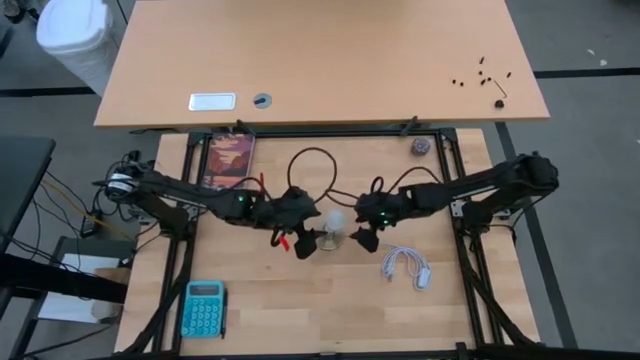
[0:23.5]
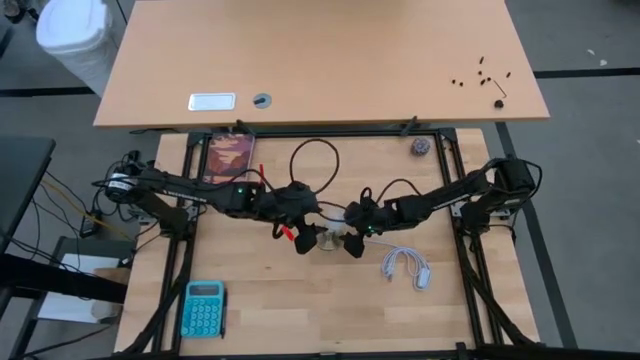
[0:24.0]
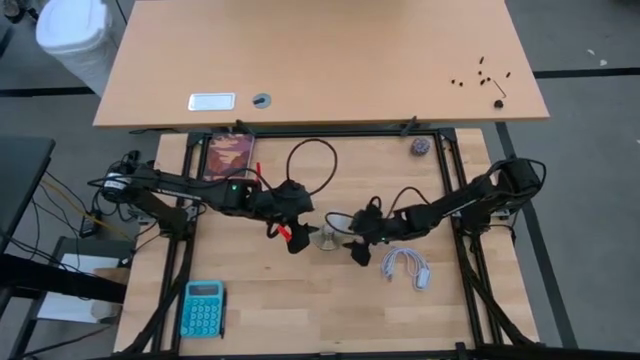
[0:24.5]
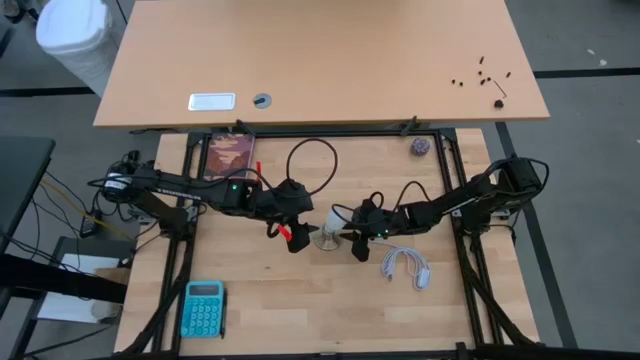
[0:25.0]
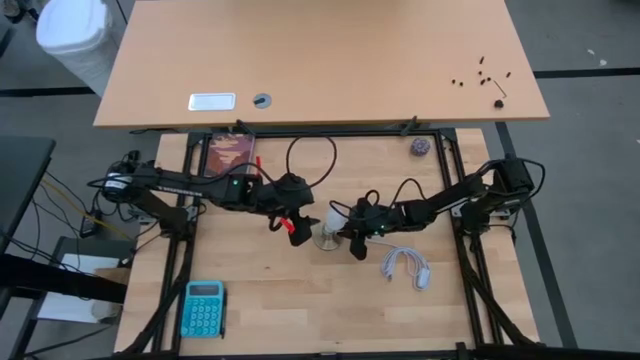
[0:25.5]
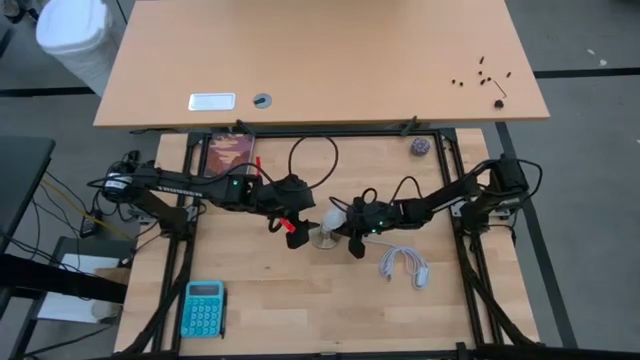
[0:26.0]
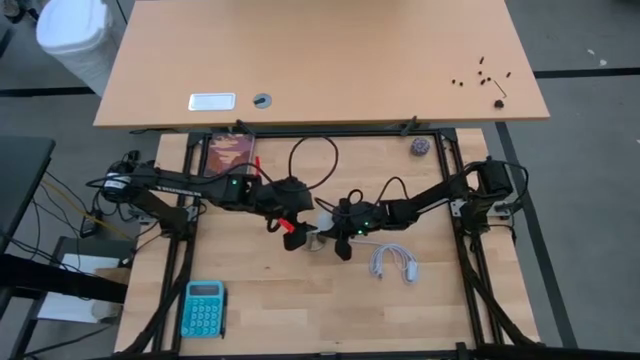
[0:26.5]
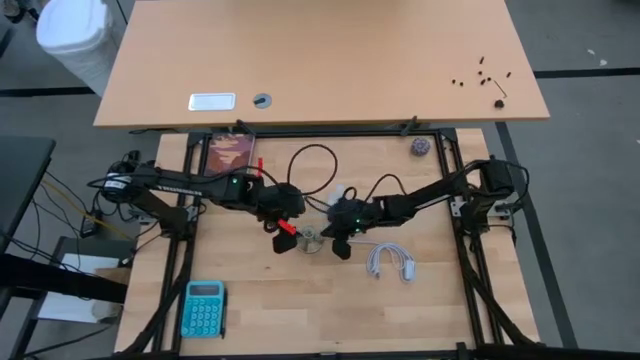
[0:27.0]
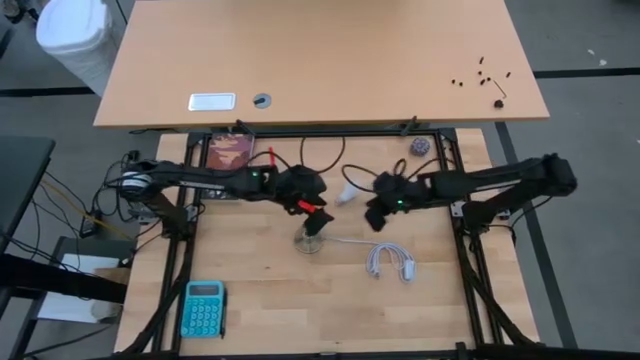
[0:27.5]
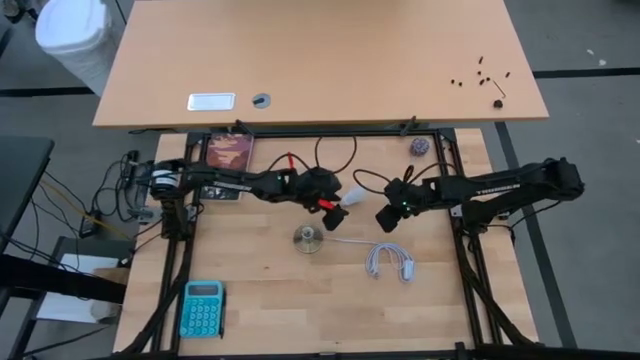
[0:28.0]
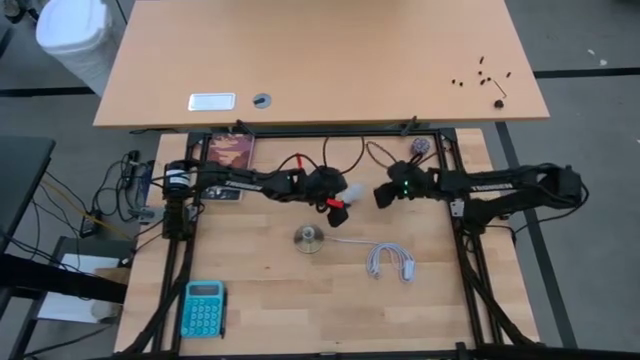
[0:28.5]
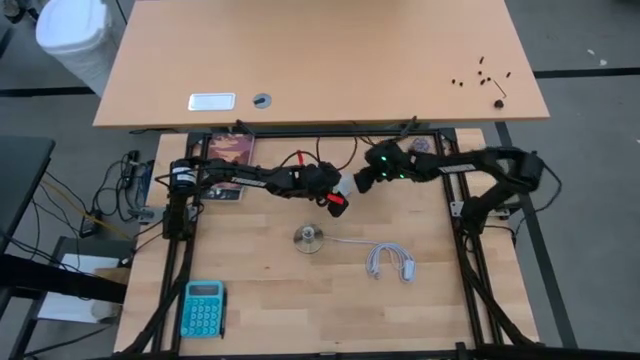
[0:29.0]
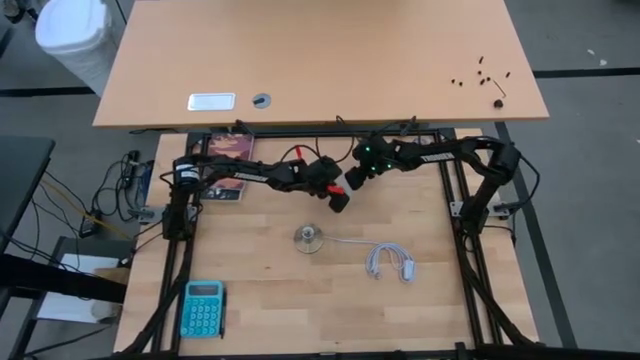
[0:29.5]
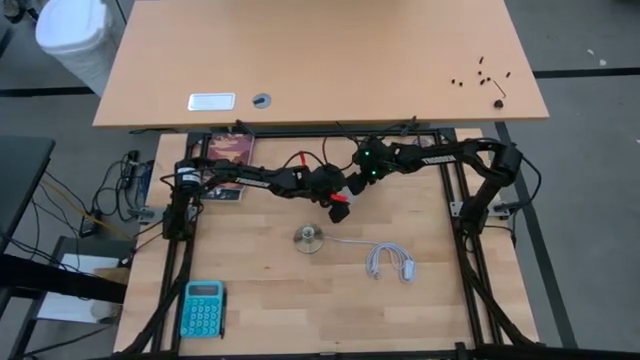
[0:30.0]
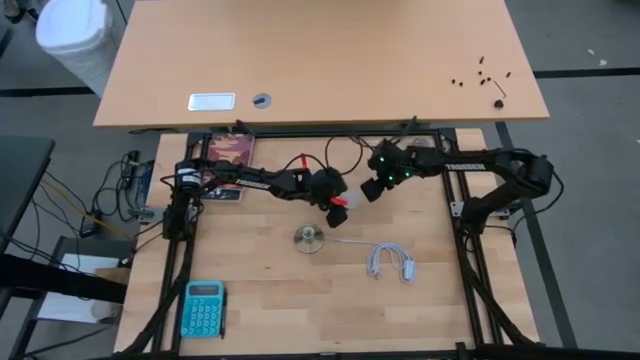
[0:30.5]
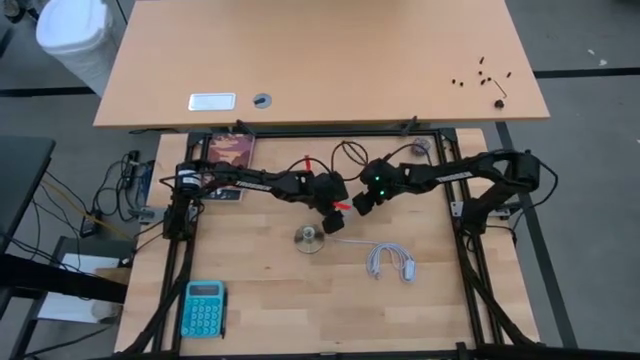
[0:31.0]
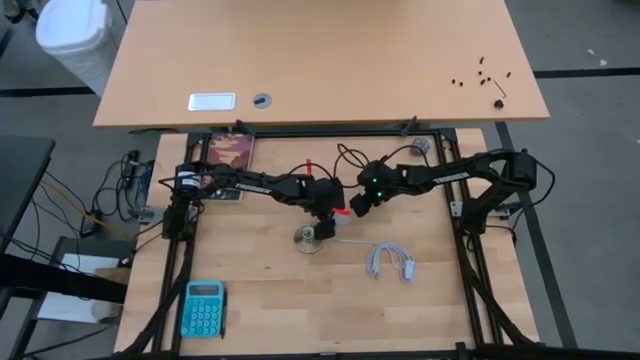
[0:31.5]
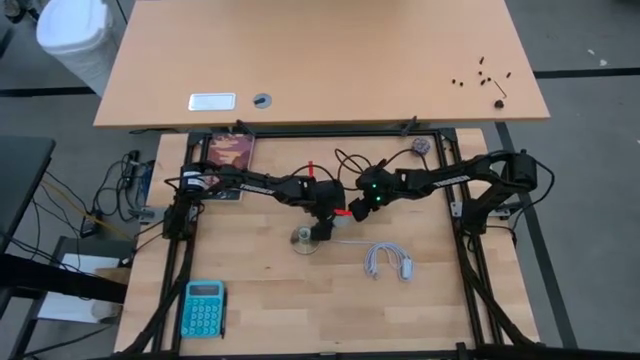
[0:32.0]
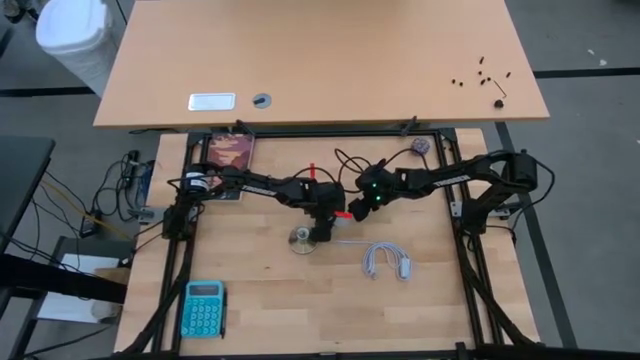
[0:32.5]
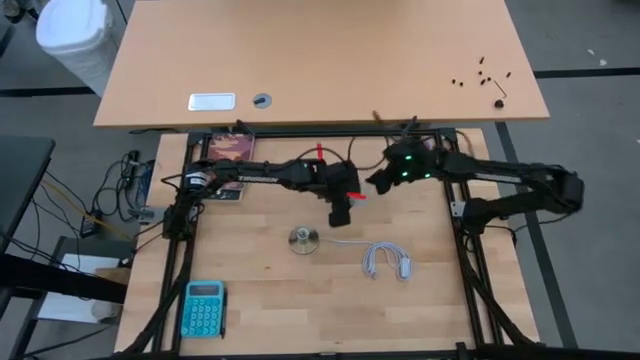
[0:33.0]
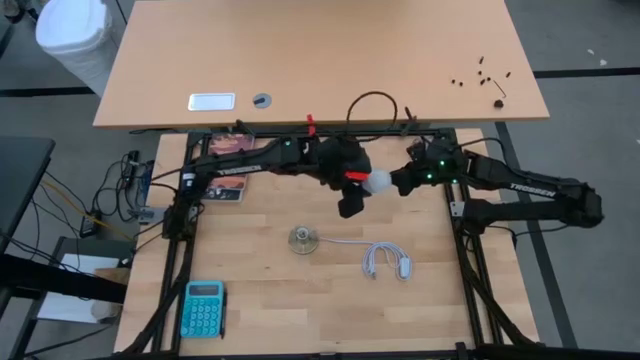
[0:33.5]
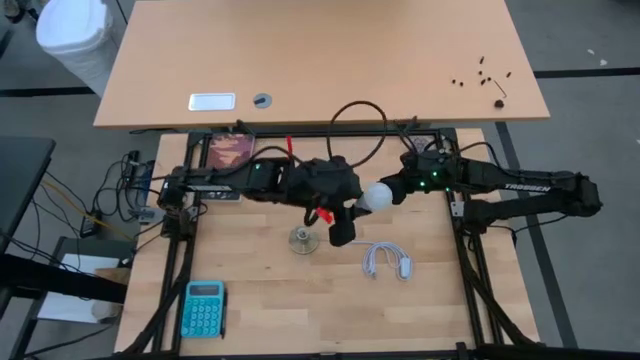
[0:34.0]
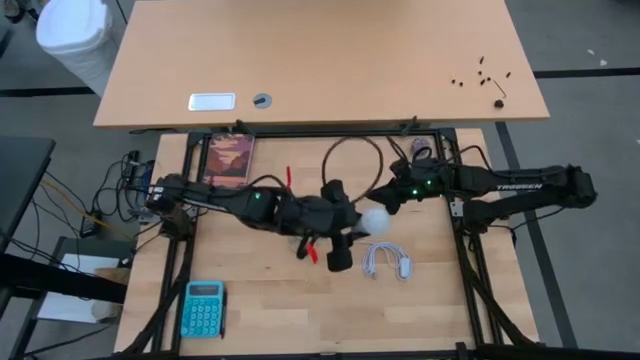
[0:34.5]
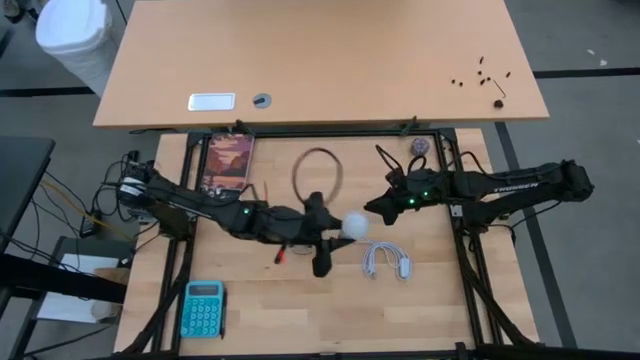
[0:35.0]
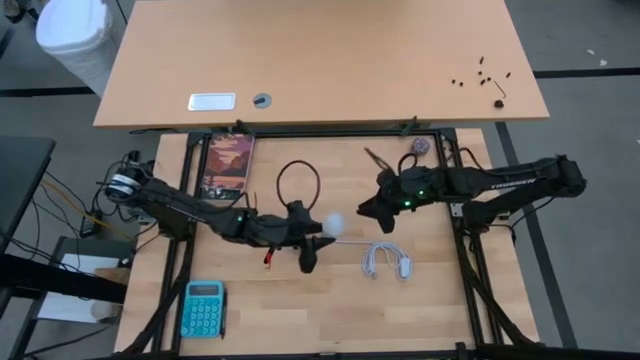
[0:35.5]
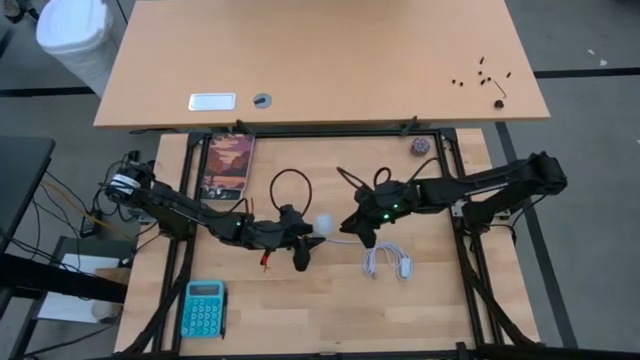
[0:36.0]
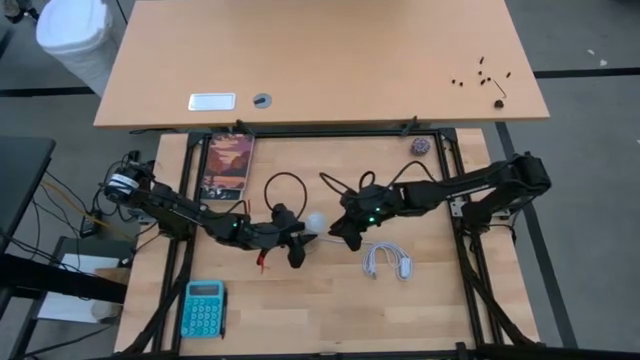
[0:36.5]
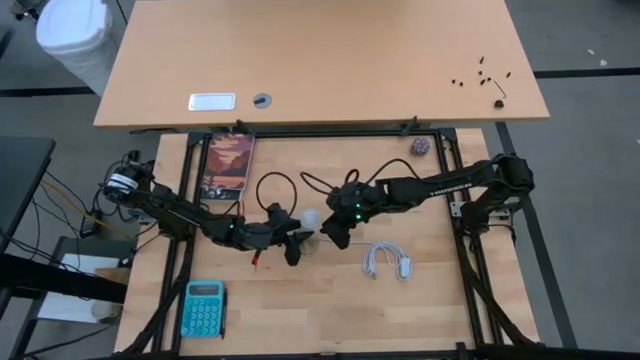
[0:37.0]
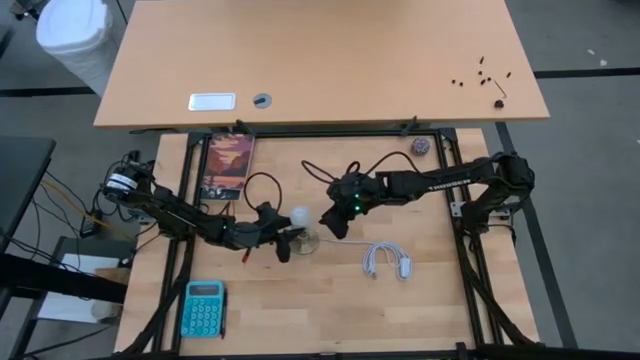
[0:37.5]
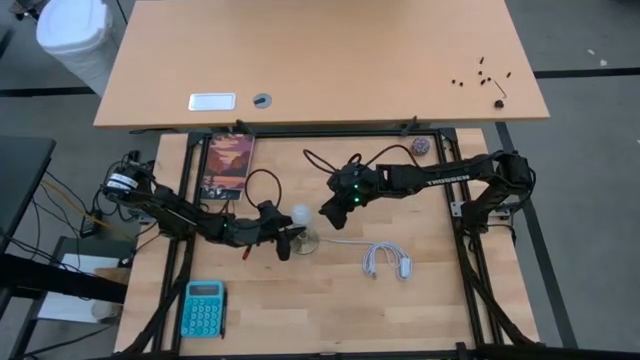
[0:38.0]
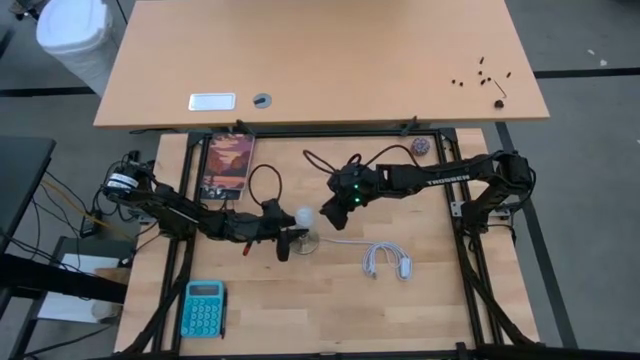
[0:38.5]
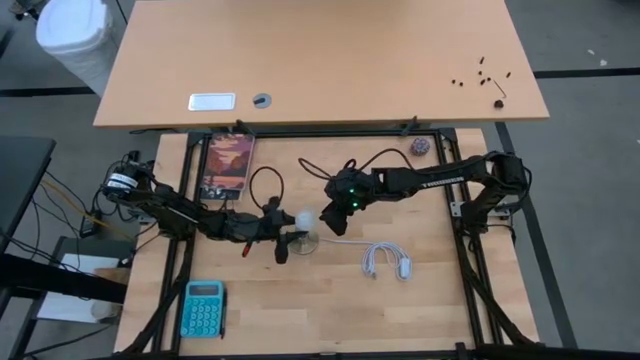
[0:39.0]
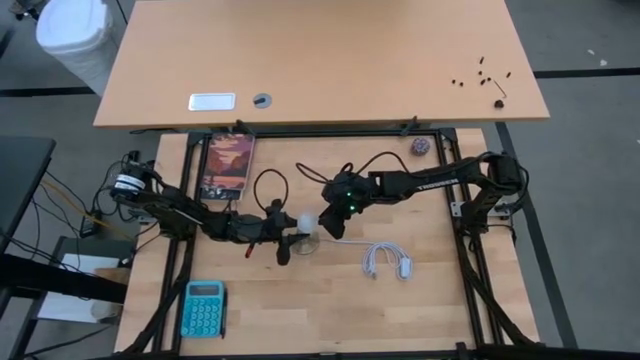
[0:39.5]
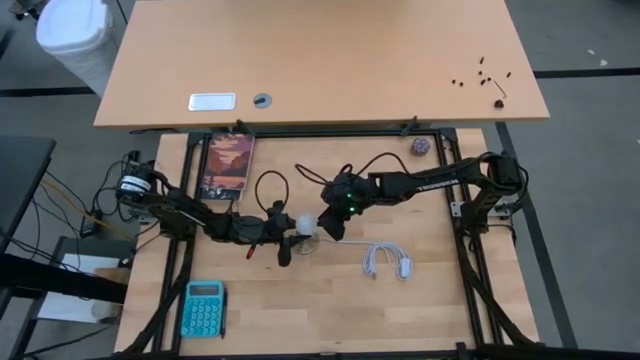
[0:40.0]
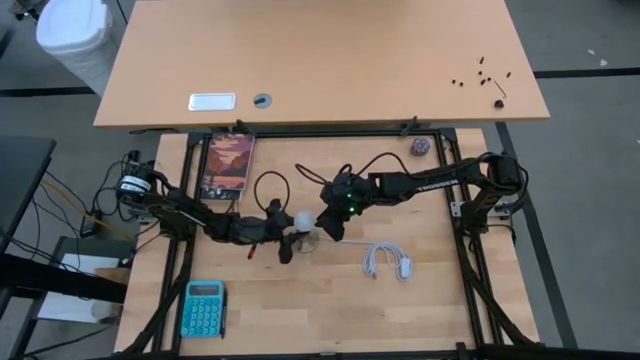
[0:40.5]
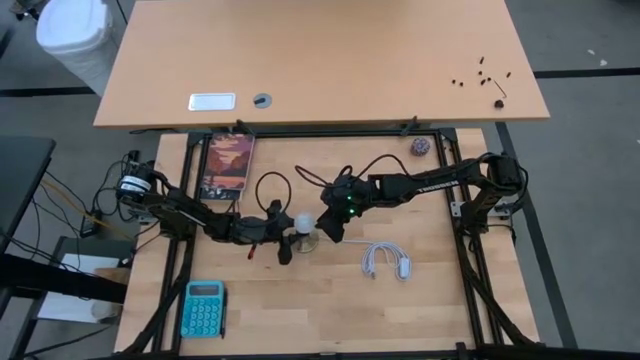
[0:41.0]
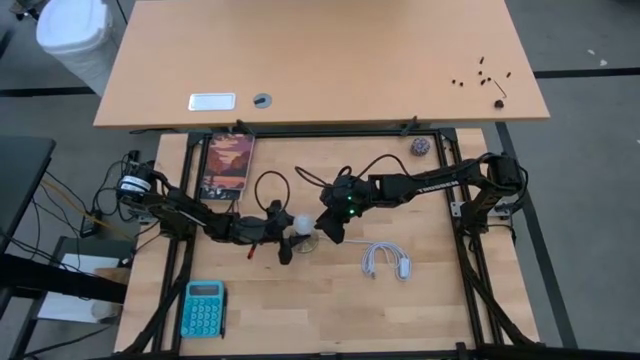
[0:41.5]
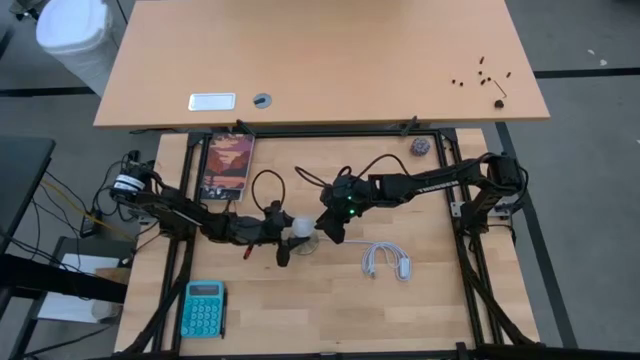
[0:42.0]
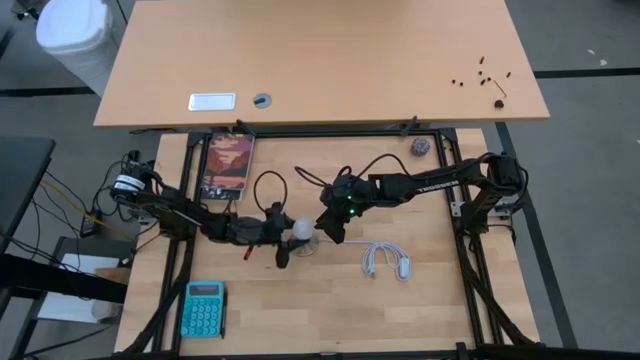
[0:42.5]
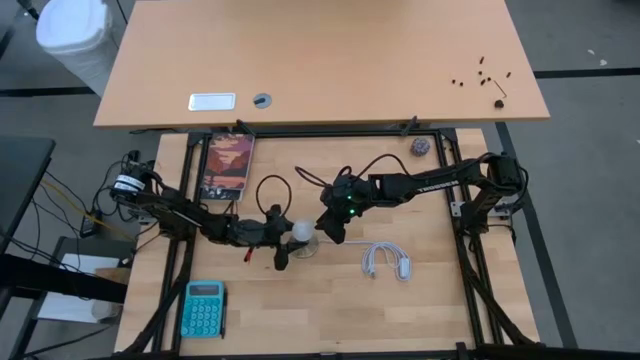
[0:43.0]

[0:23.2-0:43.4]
Task: Screw lightbulb
Insert the lightbulb into the desk lamp
